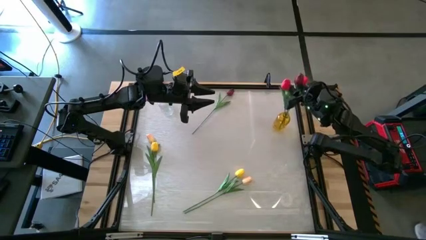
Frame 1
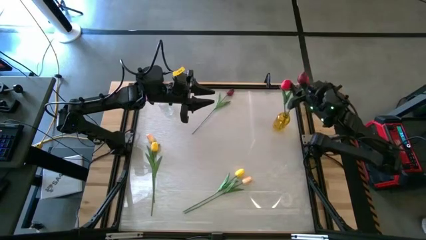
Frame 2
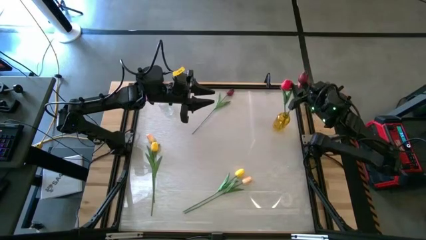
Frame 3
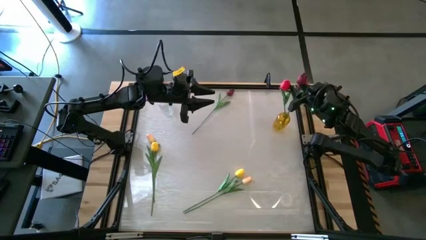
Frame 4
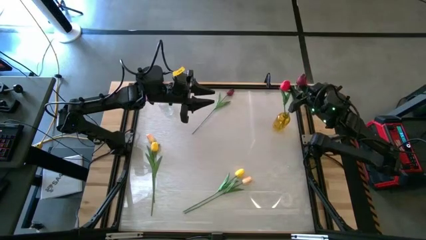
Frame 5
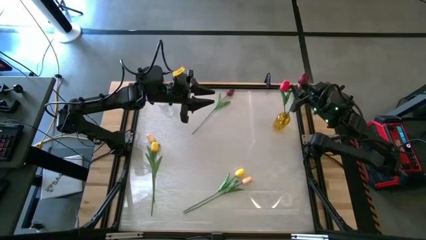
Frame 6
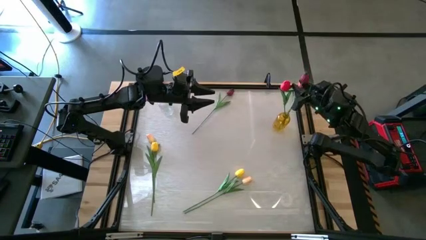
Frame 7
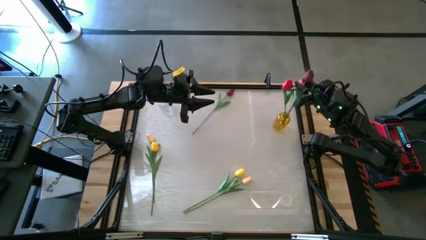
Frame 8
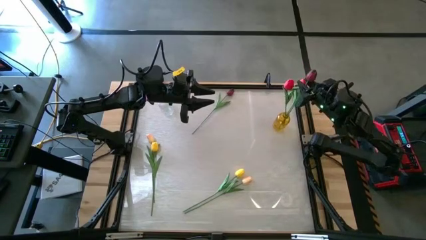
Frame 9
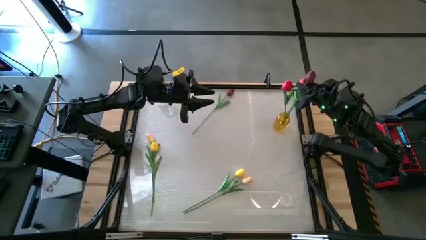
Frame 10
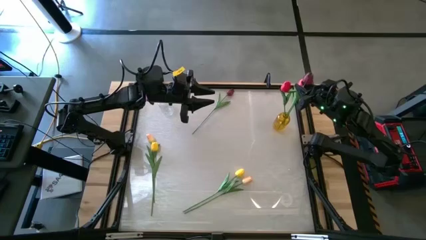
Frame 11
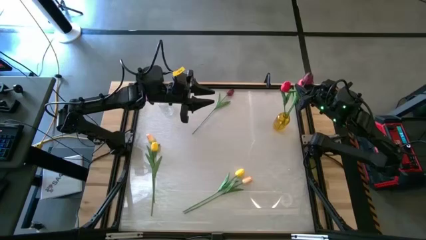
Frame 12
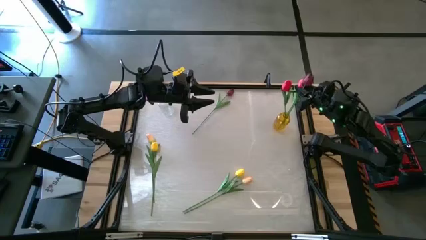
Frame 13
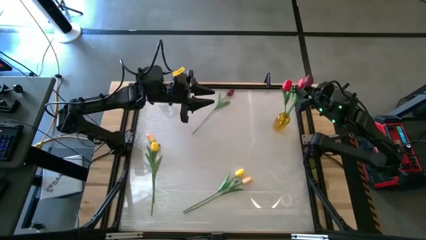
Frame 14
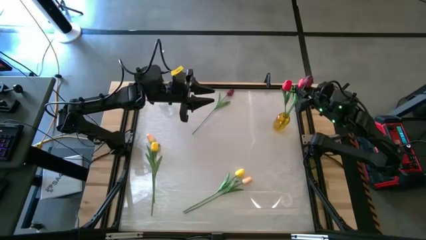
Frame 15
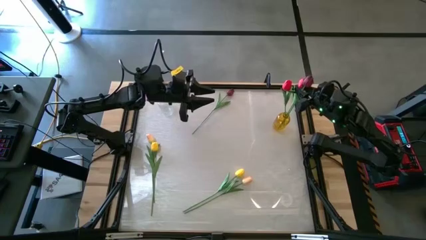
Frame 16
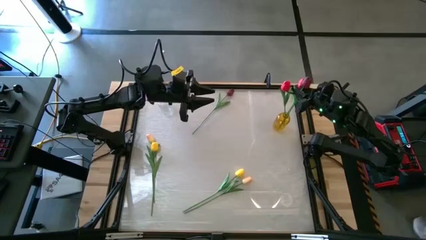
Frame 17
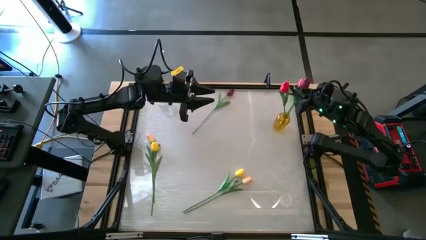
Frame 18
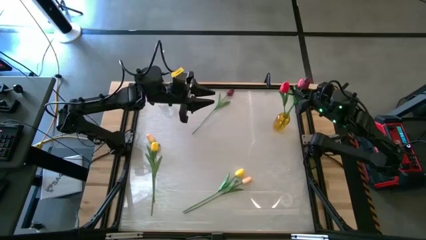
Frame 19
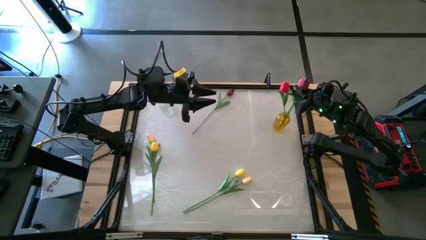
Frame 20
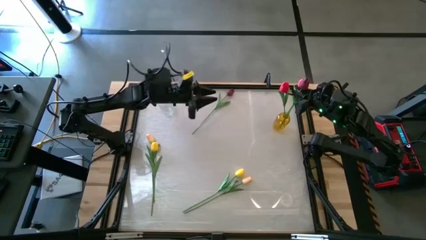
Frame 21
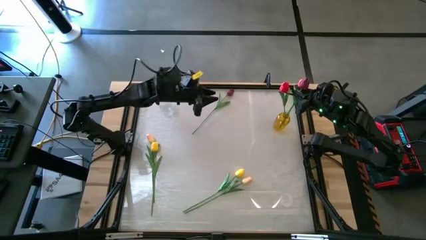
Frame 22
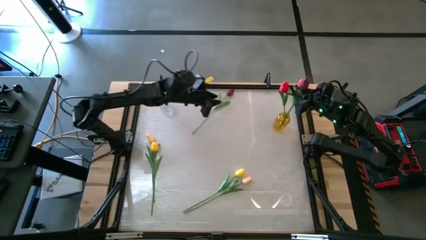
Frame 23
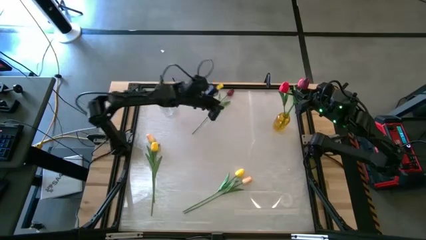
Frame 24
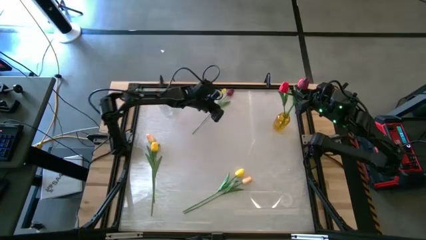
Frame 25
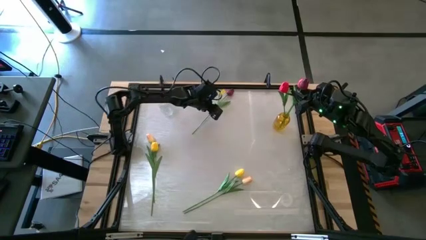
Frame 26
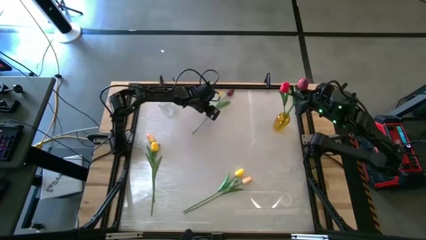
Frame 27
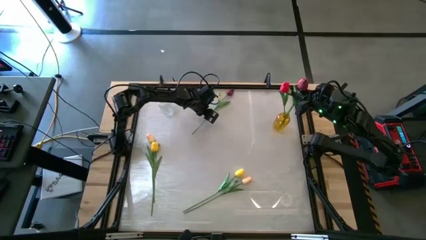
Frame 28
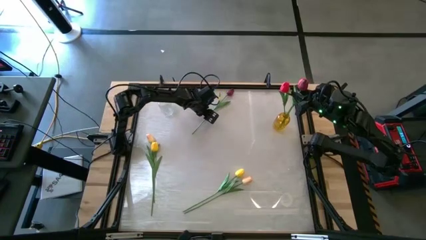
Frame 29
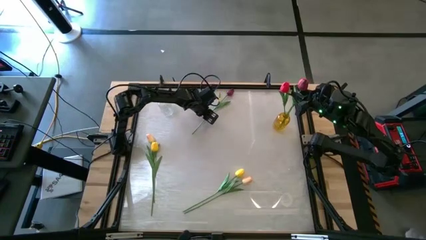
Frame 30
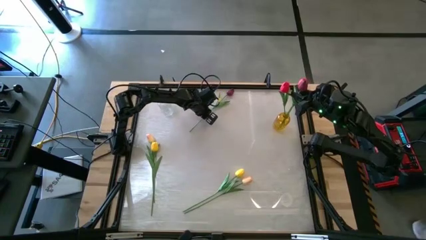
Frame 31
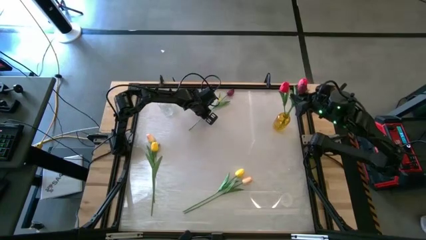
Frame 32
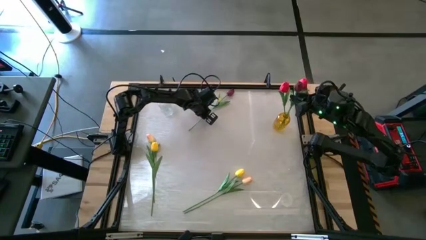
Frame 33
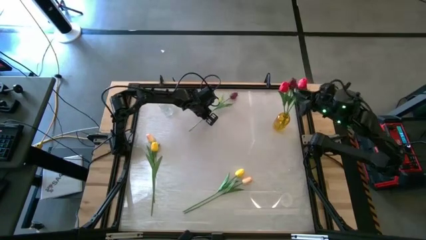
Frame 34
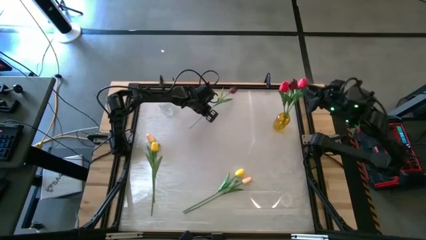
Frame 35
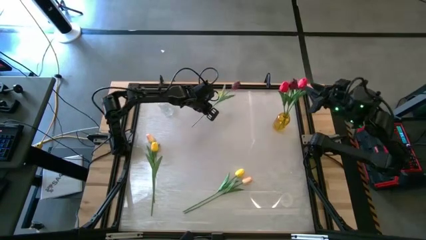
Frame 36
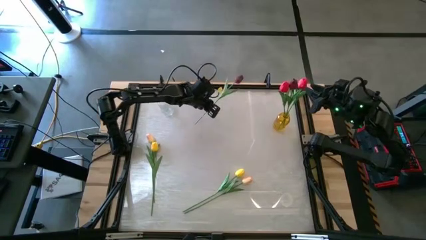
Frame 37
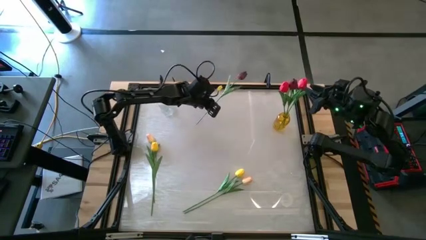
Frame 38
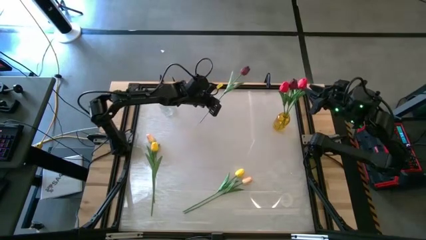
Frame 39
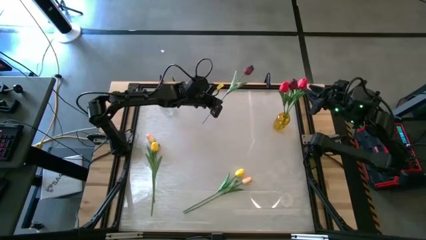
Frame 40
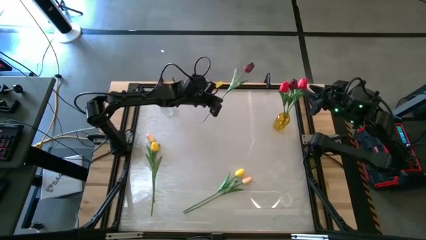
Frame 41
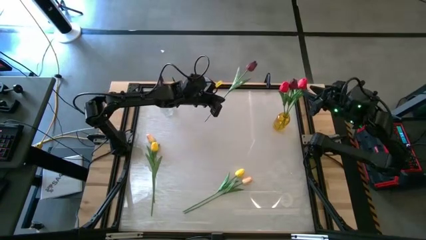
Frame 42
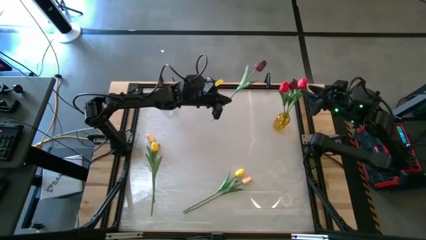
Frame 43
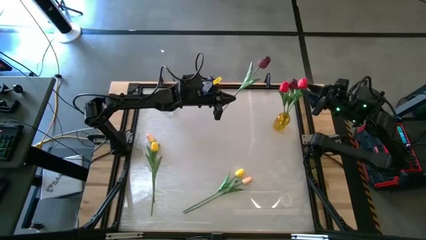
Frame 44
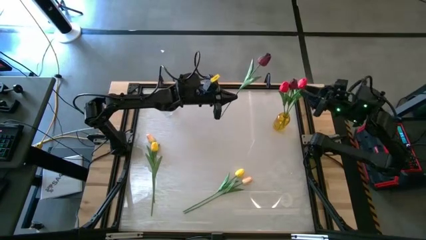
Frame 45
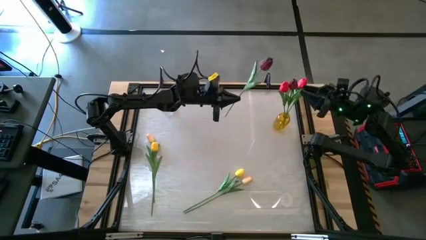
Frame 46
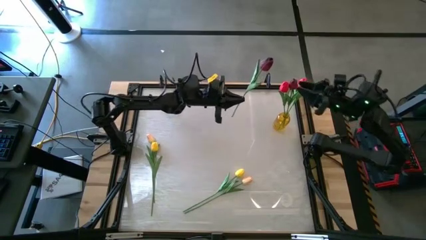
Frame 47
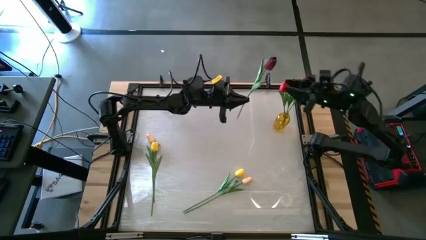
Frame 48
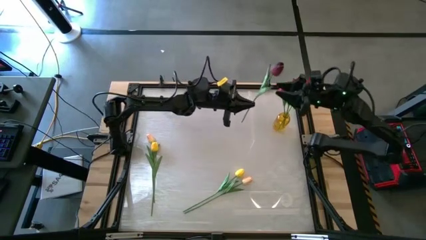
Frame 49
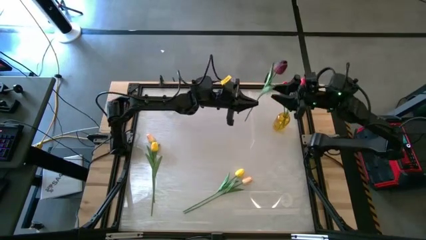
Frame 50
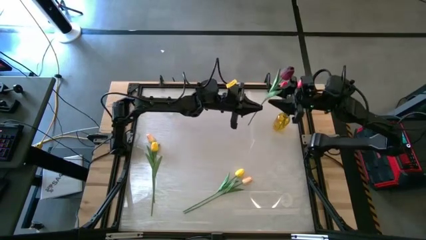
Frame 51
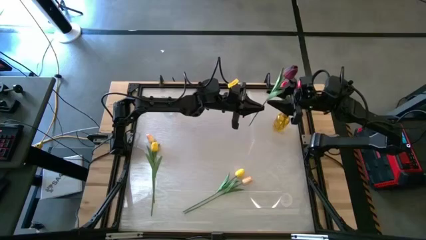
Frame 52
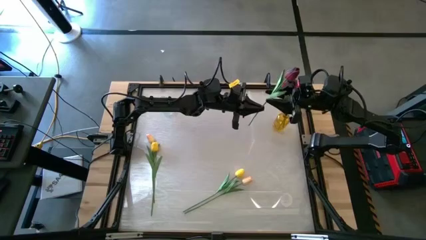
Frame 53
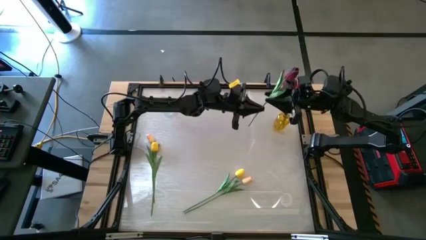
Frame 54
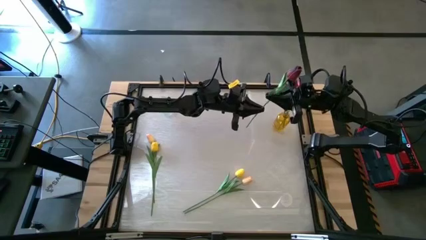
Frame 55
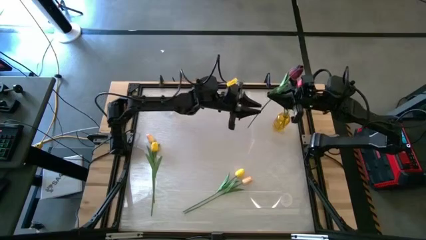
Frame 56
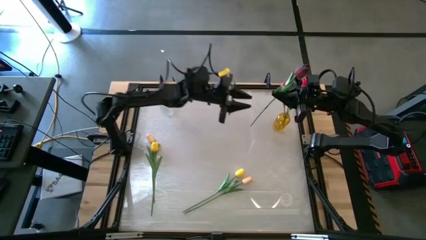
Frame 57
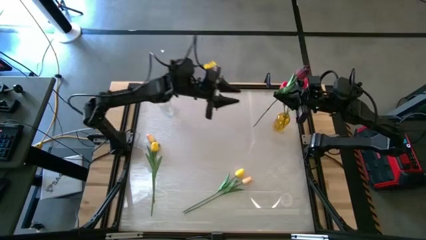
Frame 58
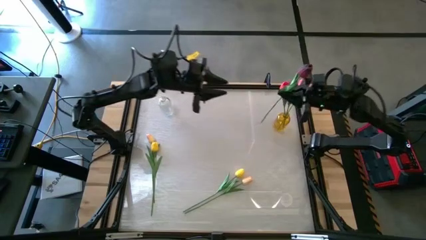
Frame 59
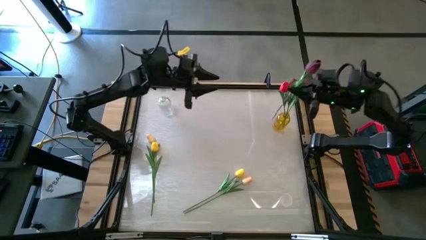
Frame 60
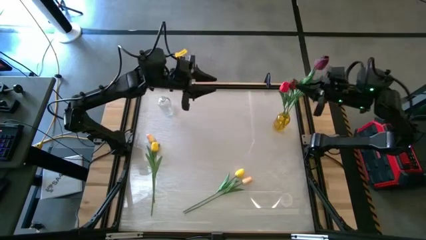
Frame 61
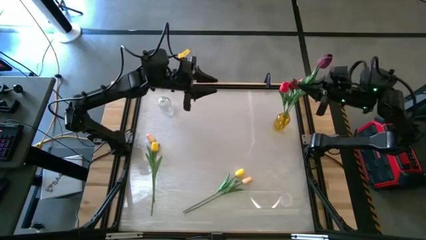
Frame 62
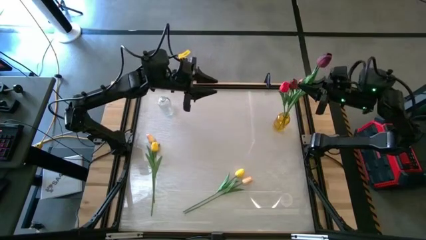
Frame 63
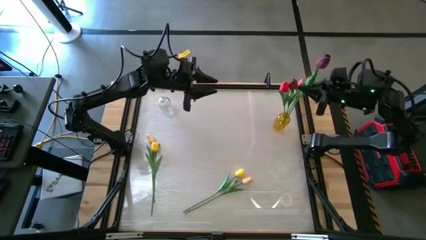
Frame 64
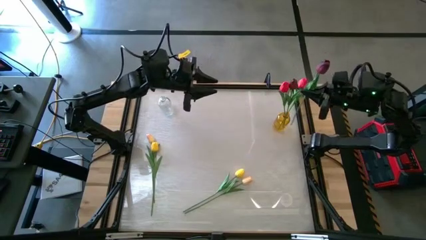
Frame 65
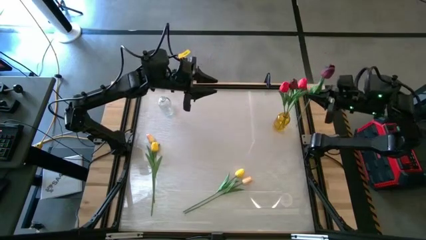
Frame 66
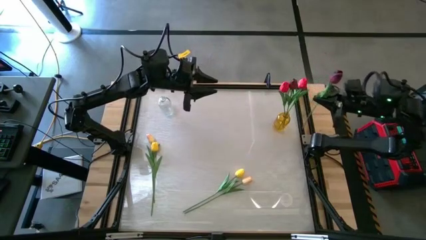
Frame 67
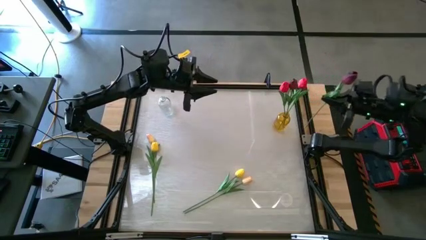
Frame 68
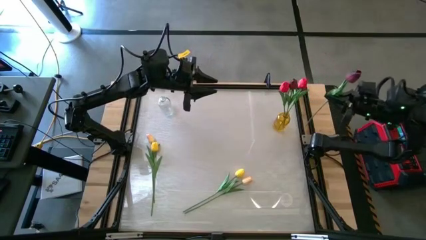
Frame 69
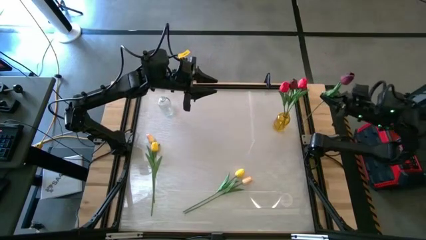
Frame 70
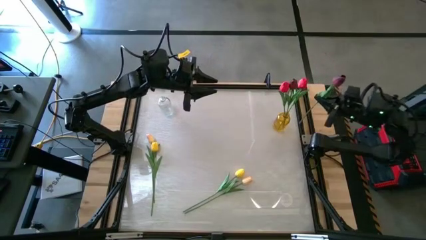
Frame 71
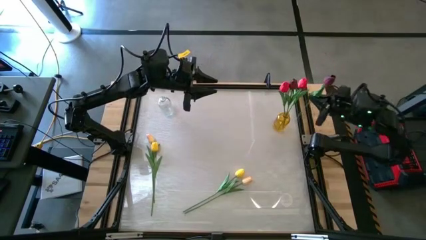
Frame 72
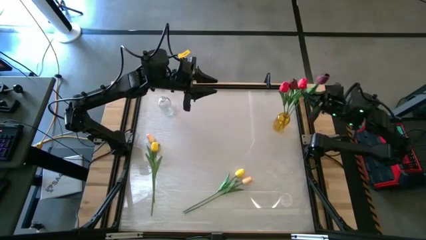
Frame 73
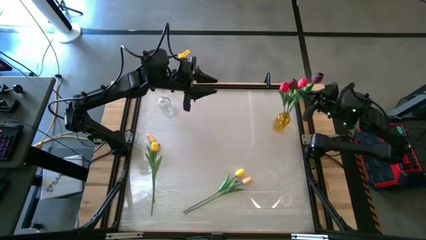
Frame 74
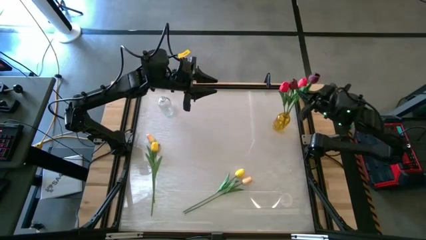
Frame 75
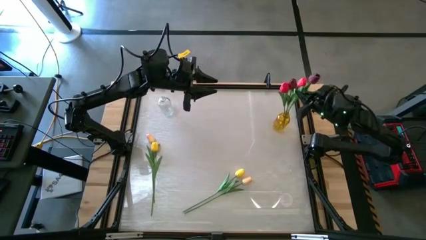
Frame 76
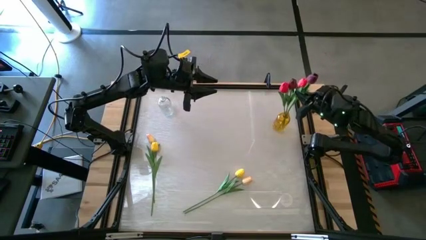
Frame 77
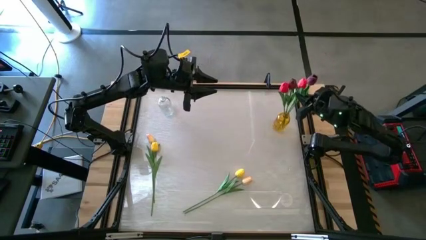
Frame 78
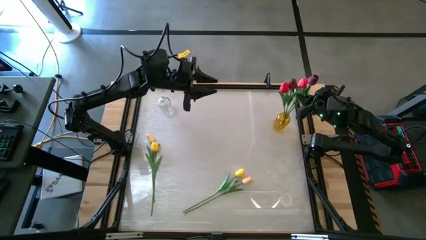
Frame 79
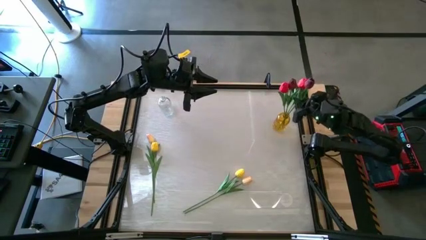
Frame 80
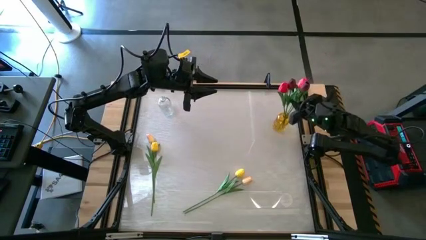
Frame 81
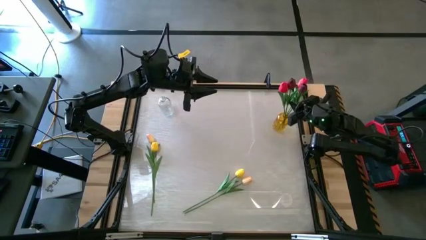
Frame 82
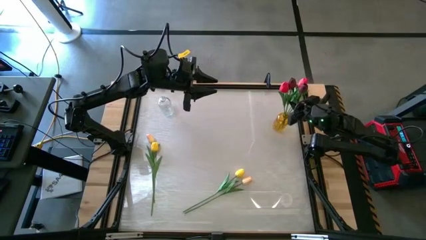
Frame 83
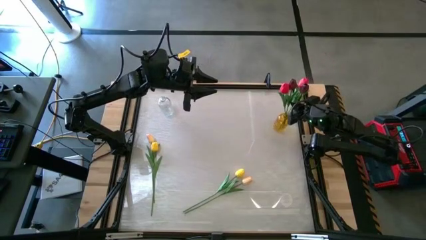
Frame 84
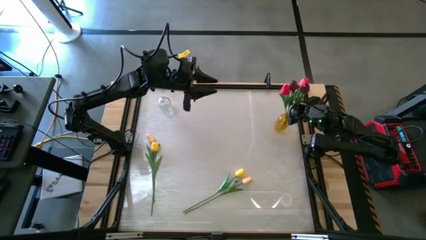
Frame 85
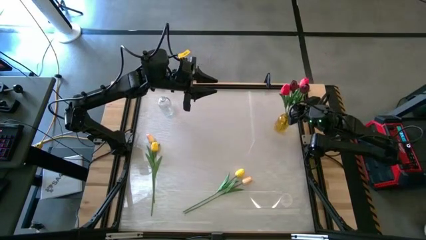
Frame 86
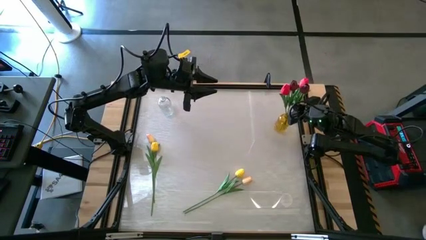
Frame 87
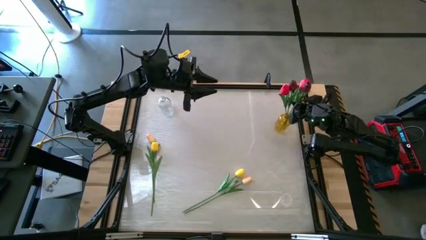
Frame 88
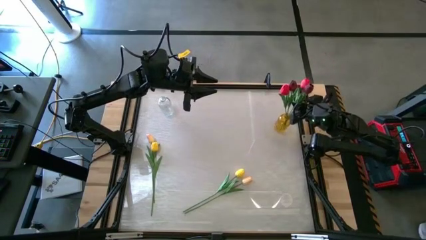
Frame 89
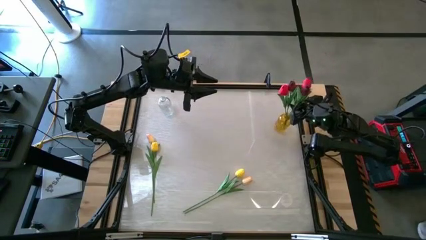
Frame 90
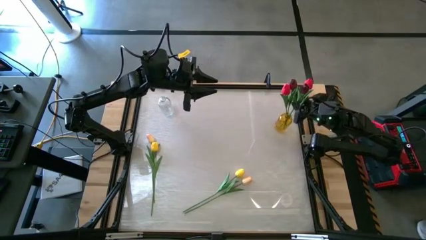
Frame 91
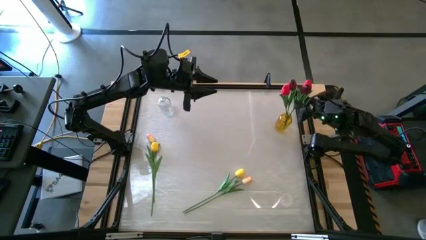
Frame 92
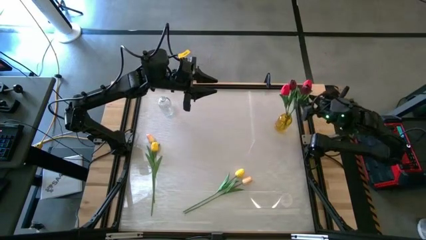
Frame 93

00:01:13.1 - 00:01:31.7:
Task: Sort flowers into vase by color
Put the dark red tulip into the yellow vase
